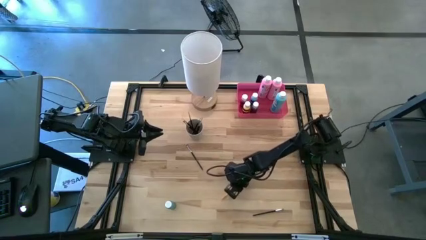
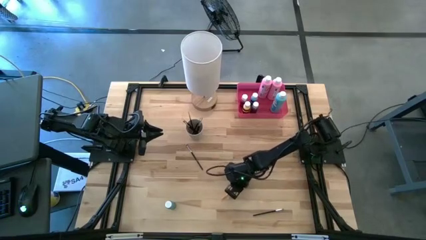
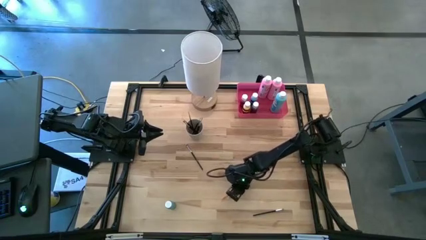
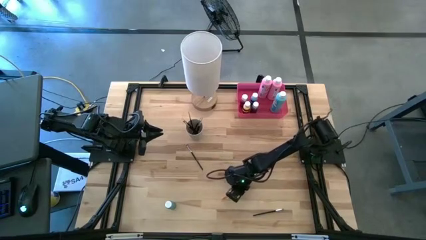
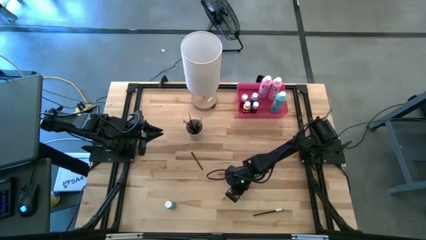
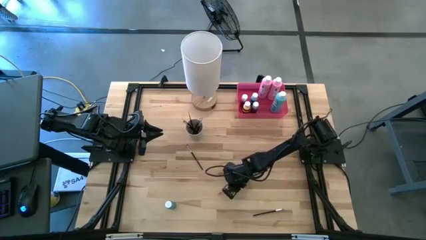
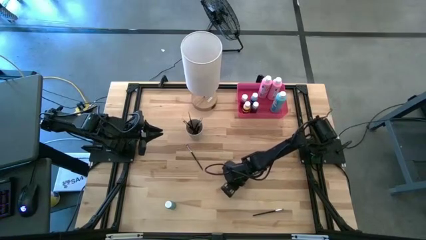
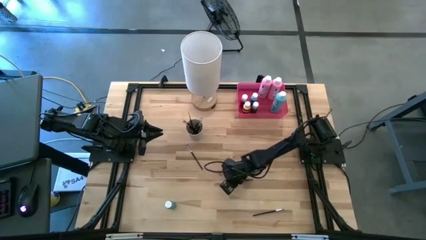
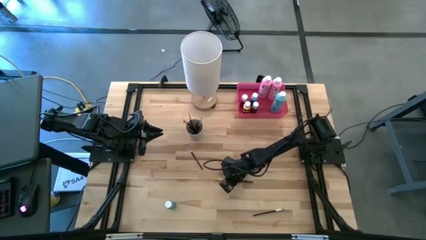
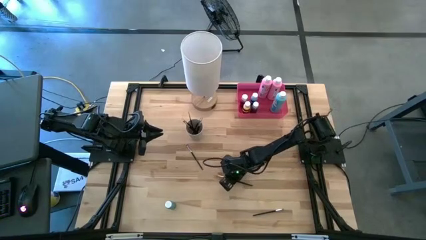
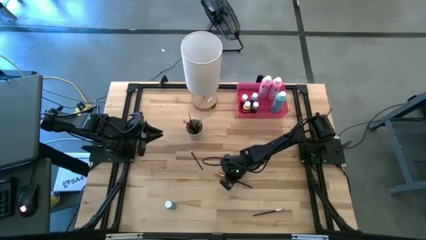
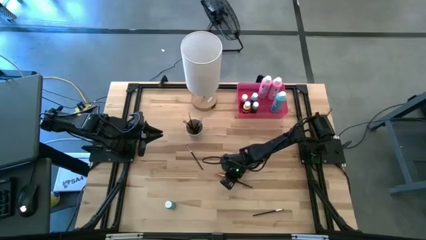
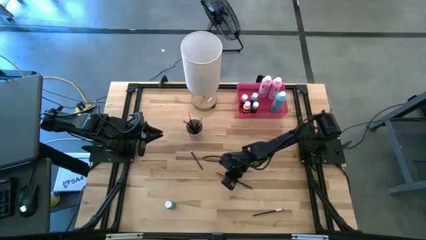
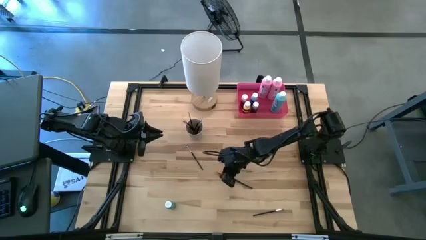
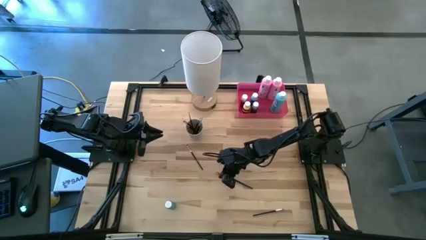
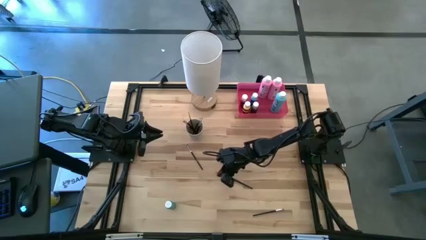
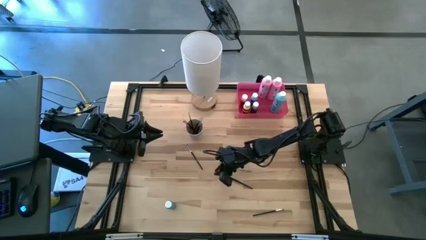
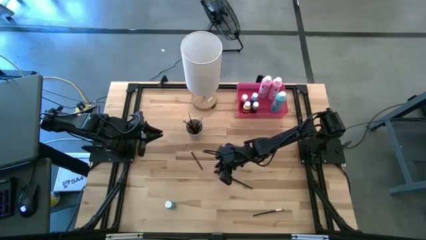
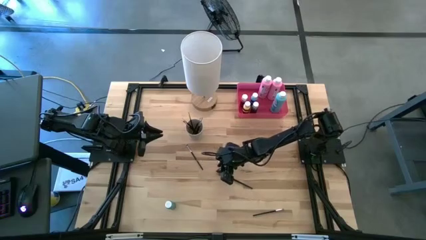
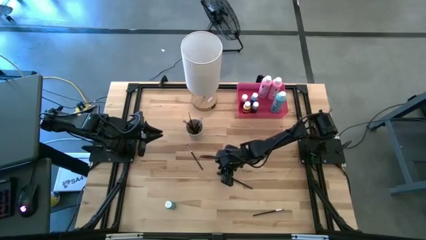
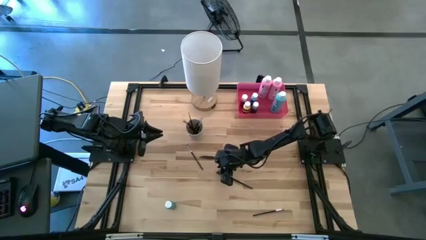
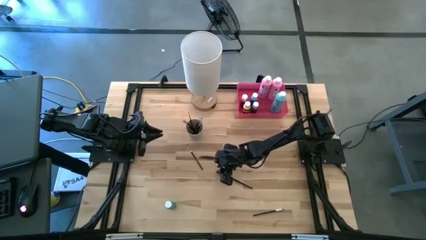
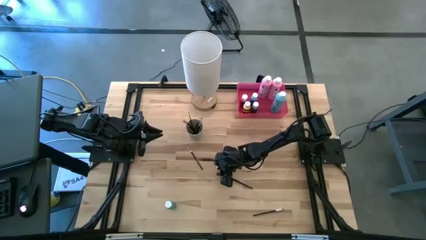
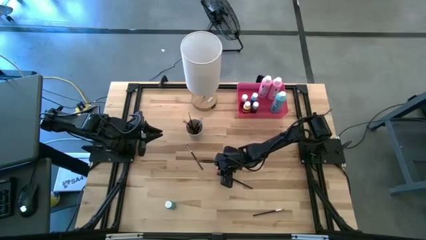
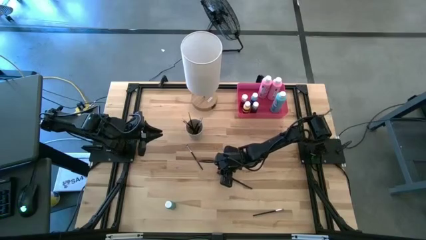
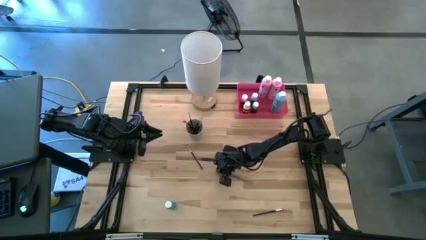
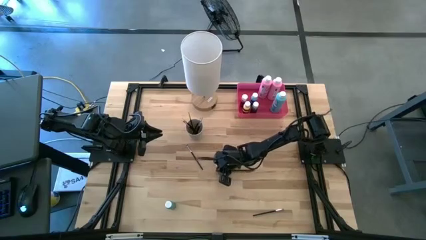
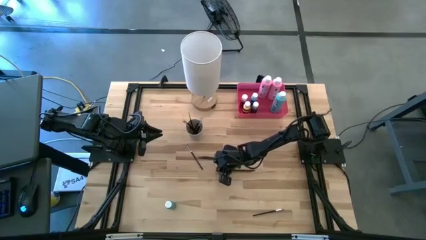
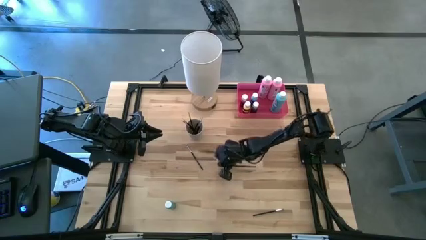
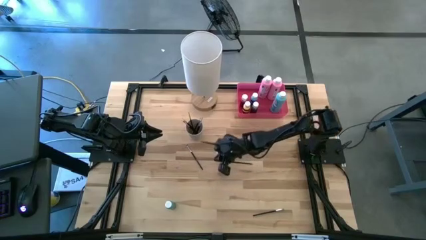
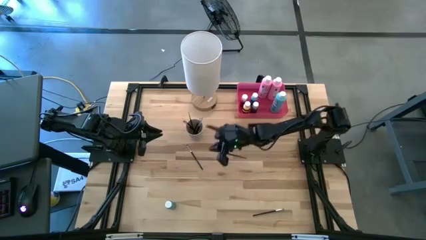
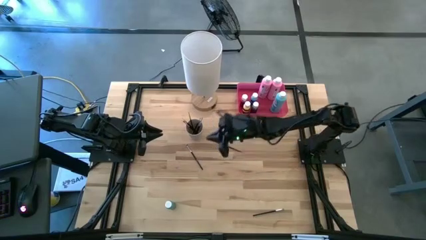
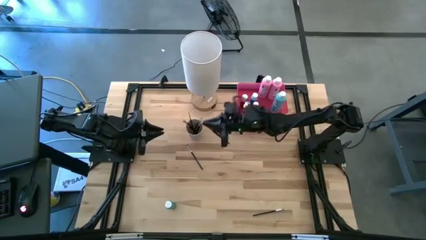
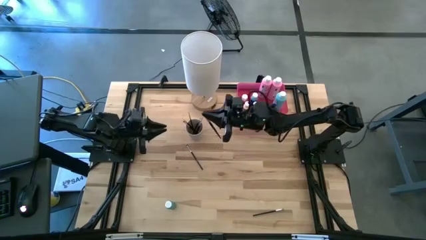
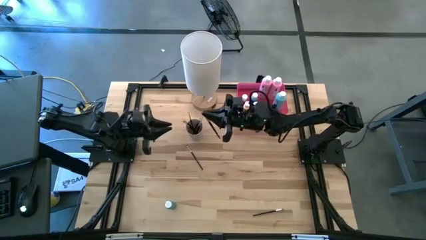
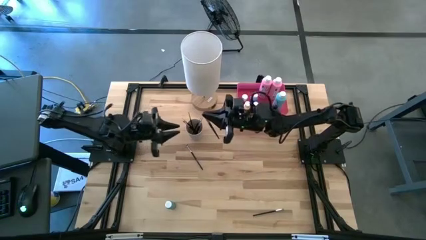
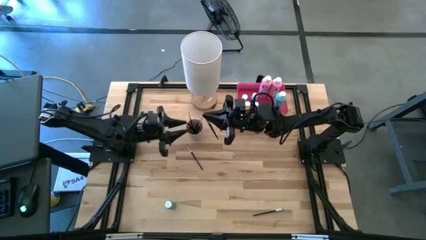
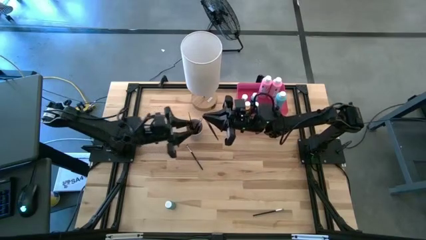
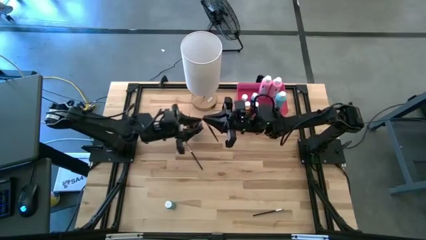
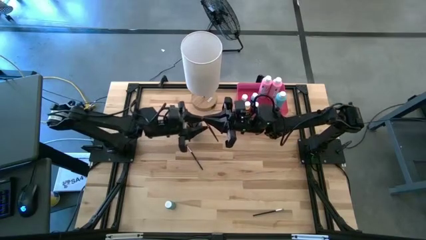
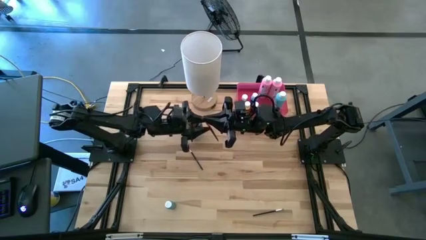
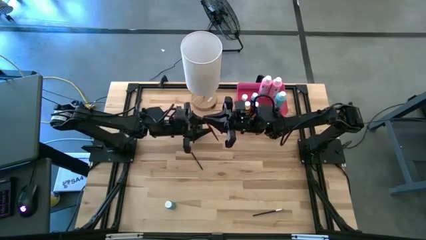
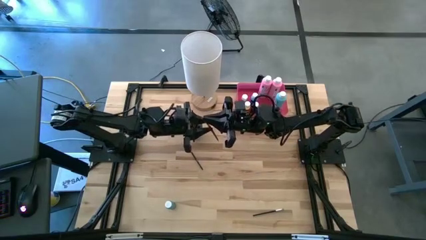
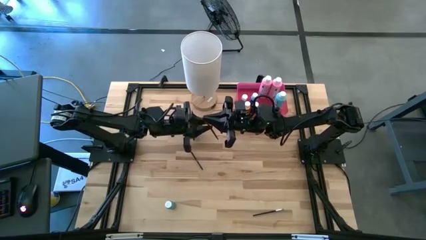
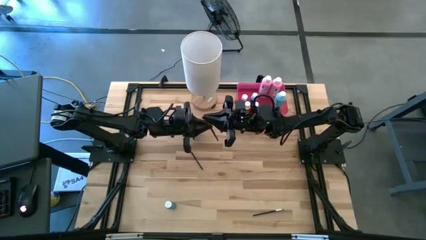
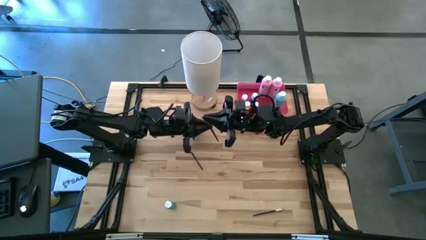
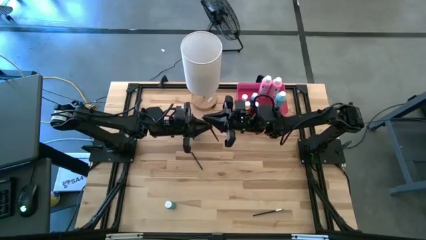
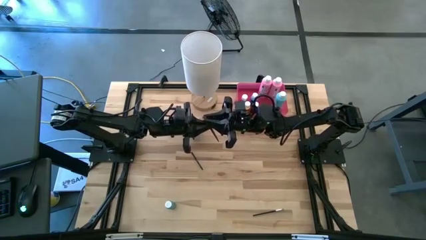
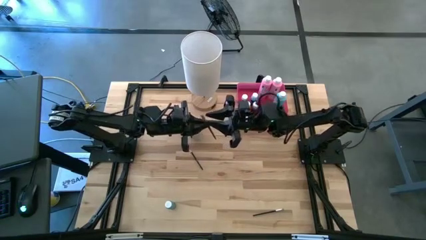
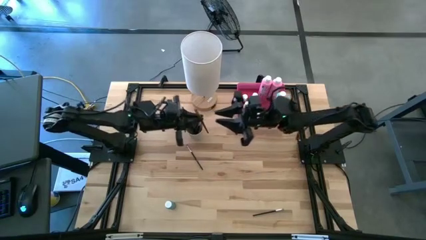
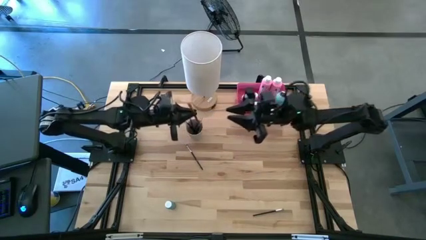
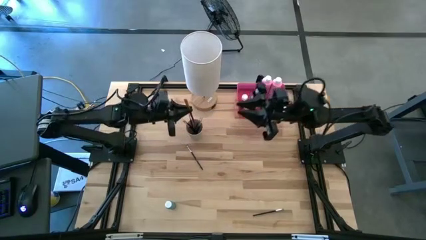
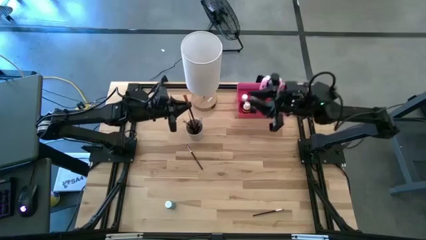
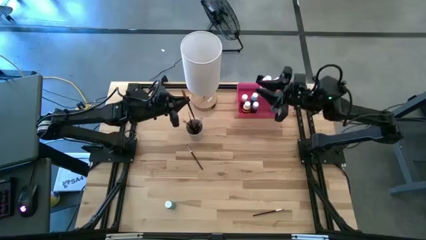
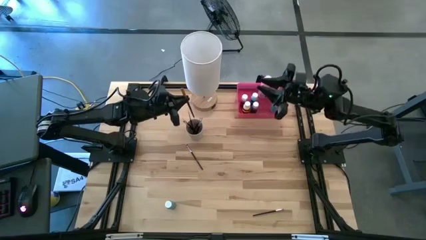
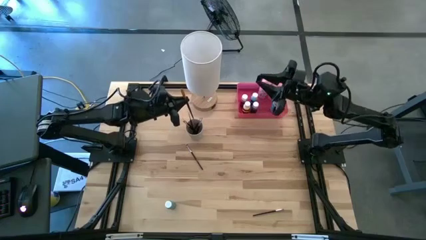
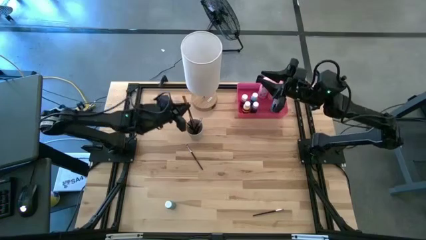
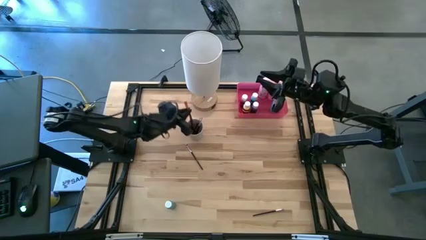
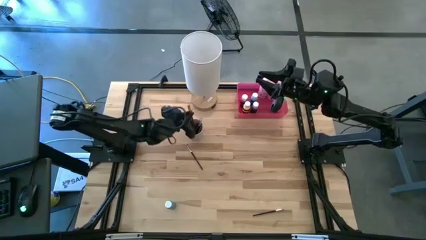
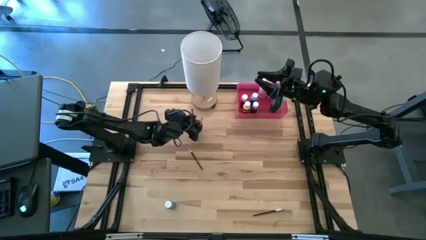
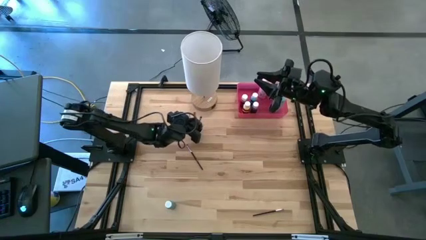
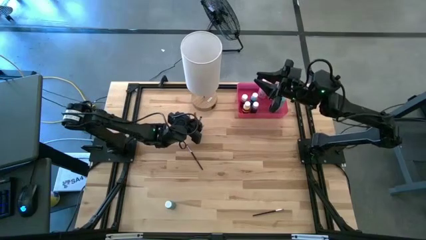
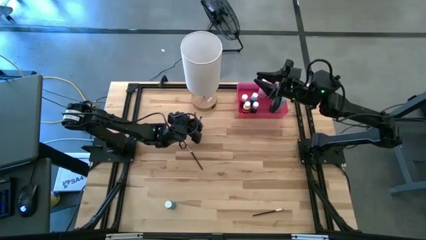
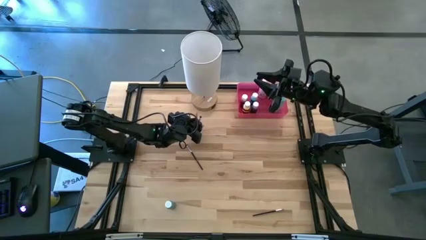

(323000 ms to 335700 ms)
Task: Pick & Place Paint Supplies
Put the golden paint brush into the white cup
